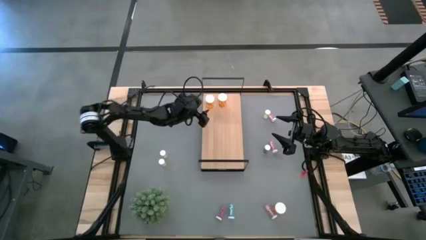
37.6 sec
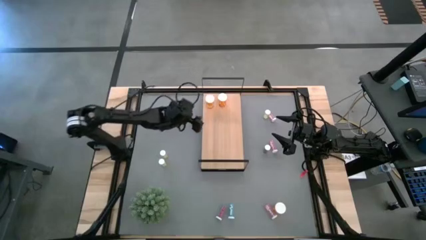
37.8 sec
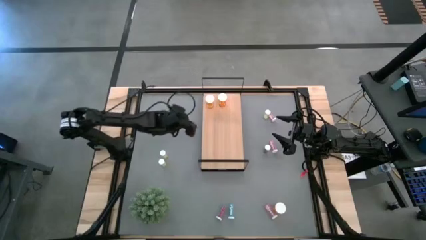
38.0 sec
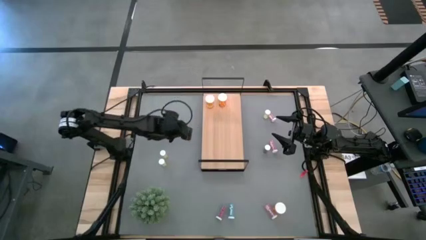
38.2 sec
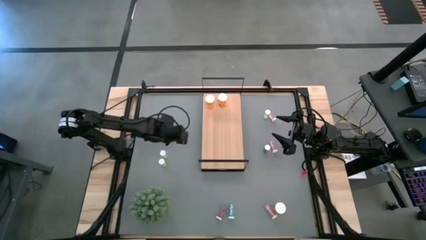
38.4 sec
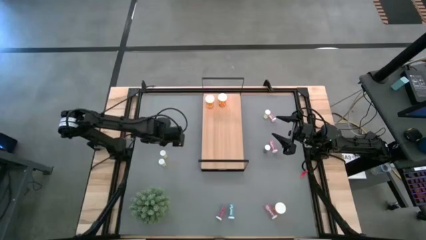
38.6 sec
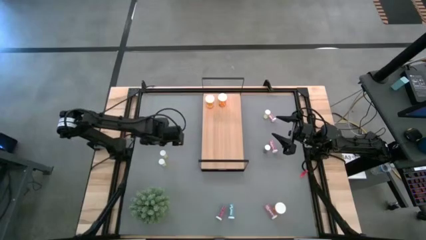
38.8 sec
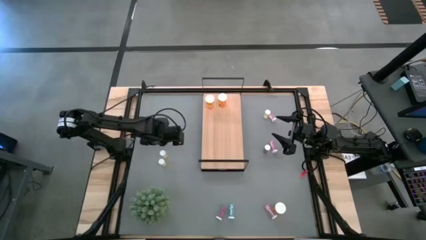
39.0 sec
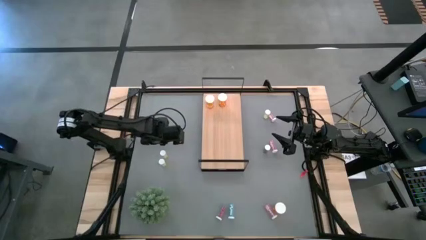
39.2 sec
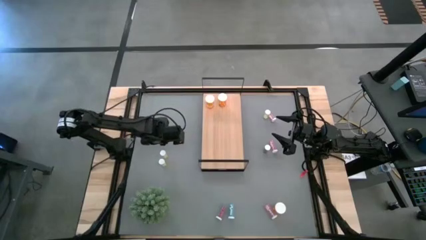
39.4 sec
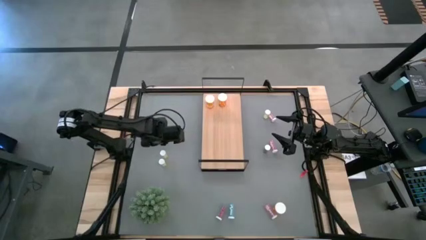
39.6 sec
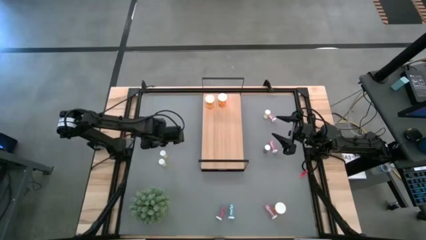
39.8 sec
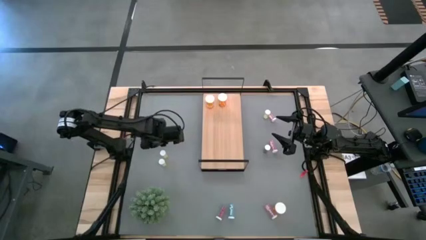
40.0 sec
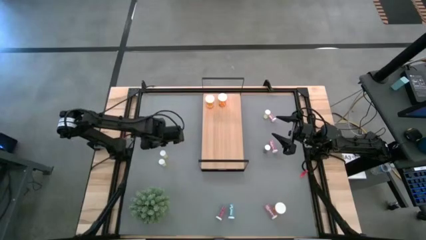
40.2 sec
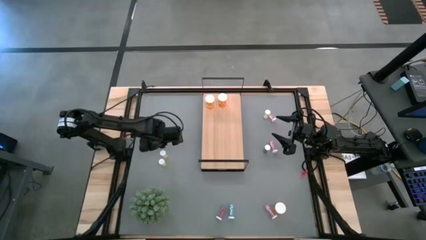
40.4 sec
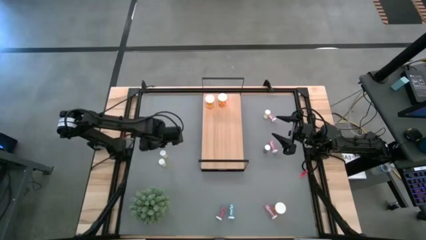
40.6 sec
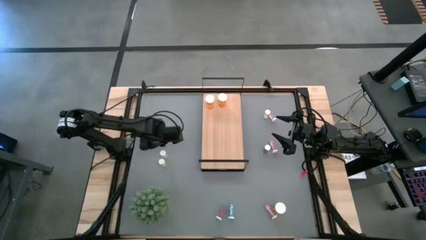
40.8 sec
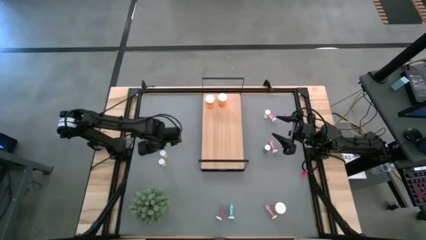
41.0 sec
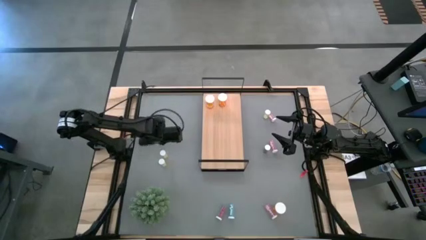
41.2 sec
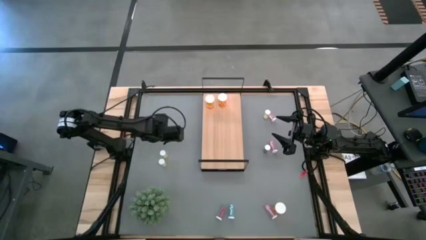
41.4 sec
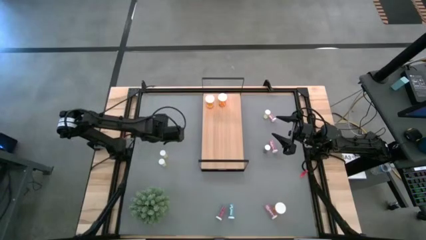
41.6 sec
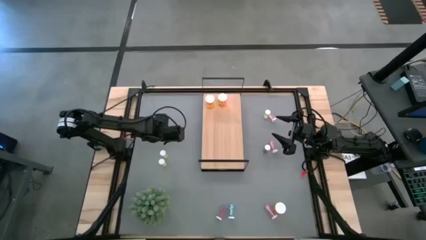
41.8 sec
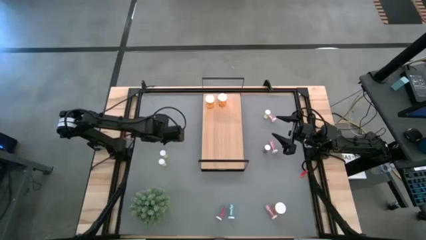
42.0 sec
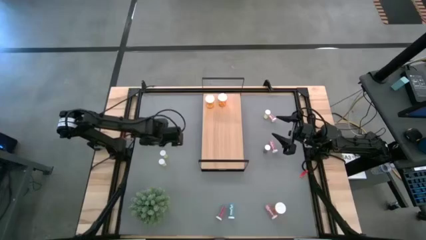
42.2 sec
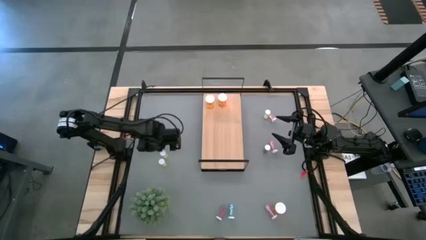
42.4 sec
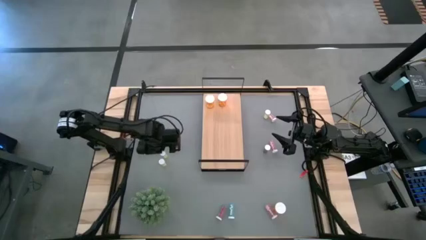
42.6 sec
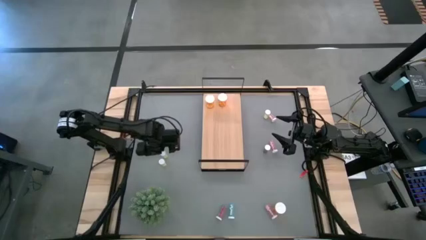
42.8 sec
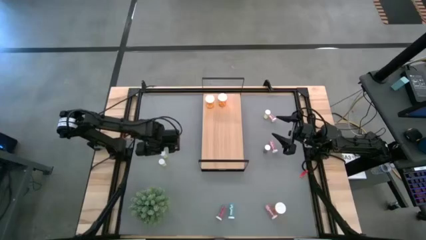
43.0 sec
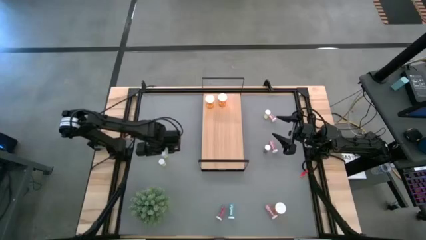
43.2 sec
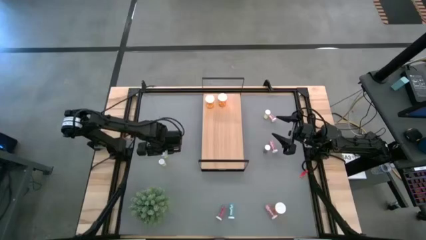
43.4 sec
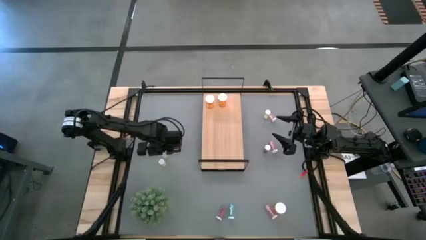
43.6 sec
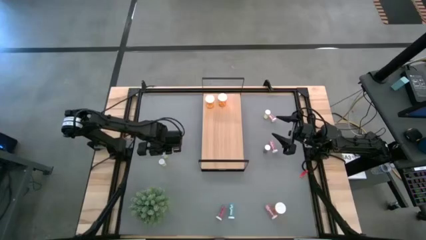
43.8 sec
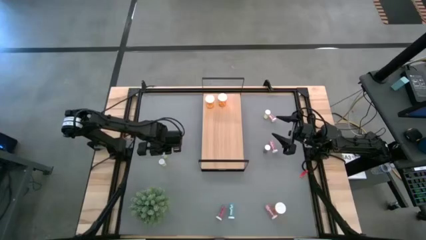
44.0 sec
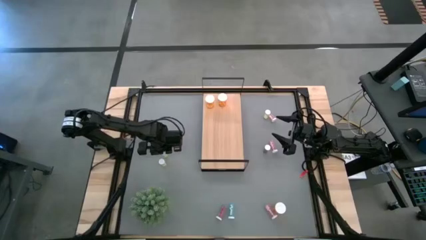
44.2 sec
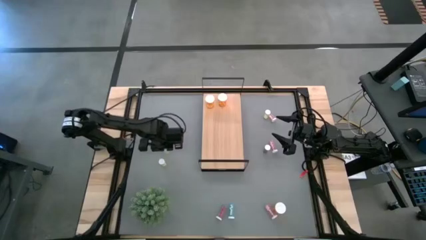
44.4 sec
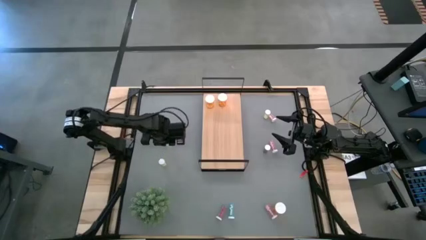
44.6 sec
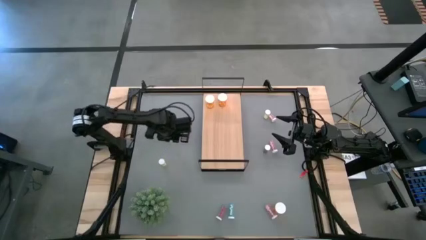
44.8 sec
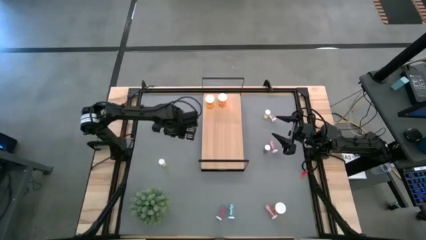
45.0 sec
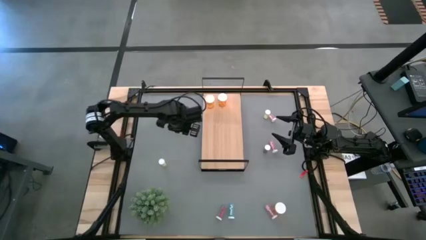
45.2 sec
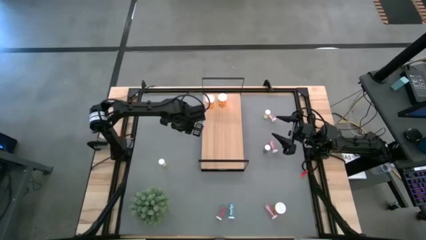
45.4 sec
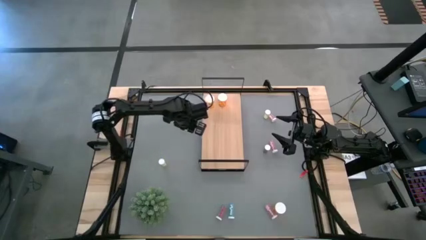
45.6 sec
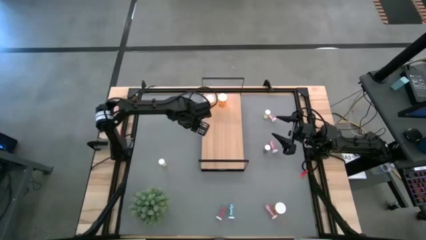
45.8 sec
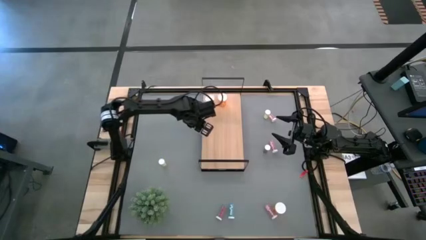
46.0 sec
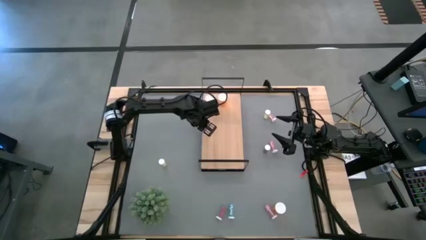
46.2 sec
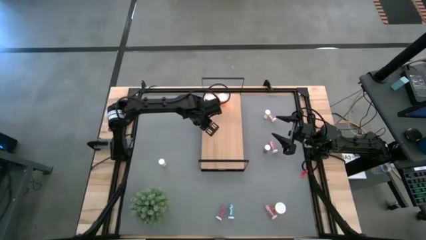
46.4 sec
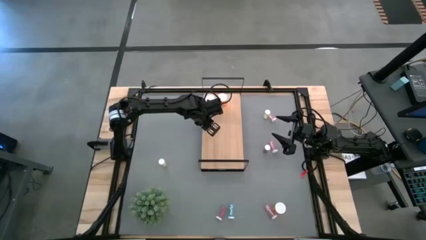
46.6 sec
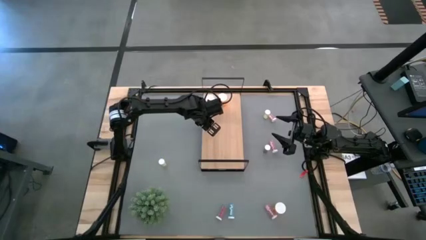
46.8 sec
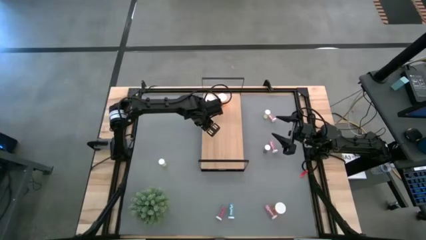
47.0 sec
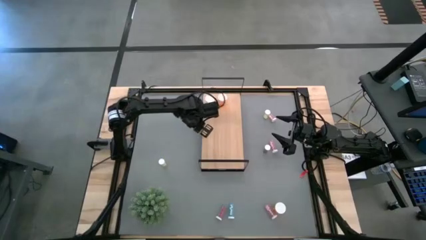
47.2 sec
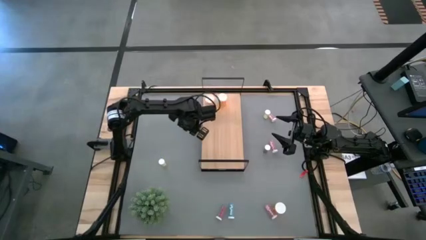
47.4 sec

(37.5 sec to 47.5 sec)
Task: Pick and place medicine bottles onto shelf by color
Put the middle yellow pill bottle on the shelf

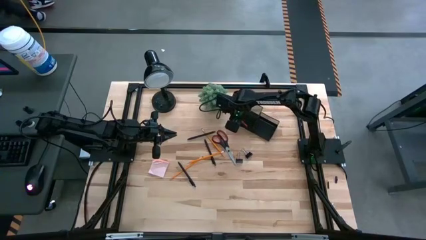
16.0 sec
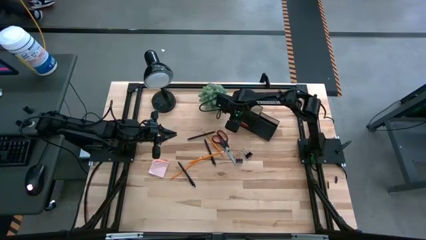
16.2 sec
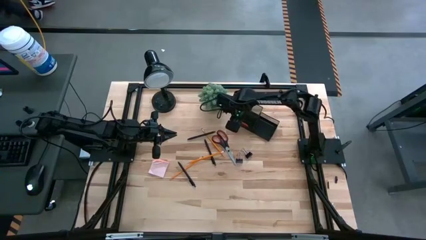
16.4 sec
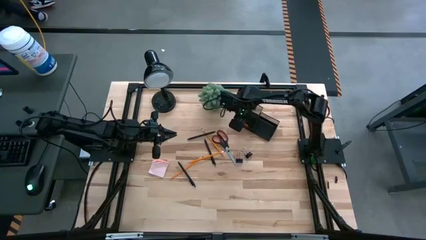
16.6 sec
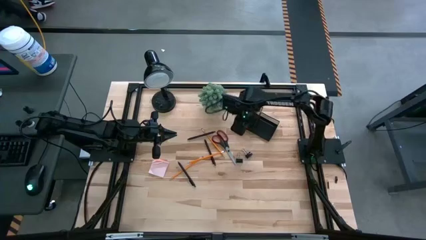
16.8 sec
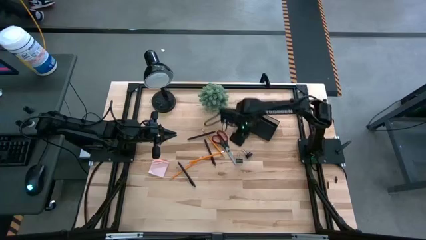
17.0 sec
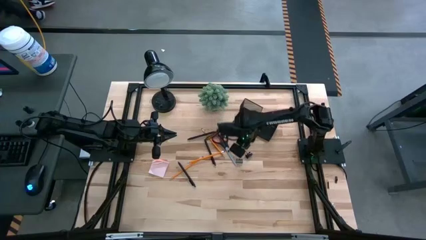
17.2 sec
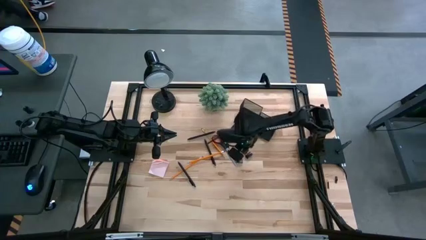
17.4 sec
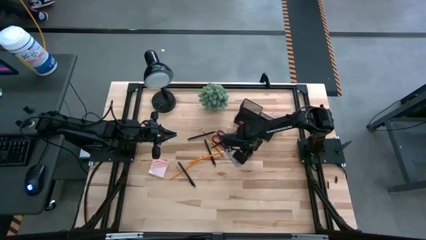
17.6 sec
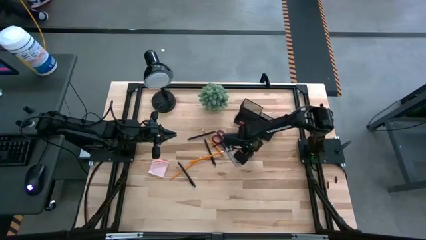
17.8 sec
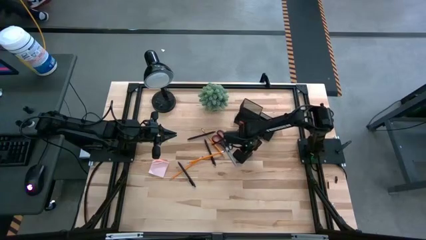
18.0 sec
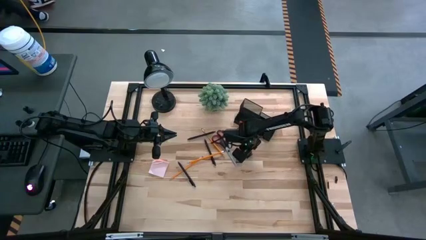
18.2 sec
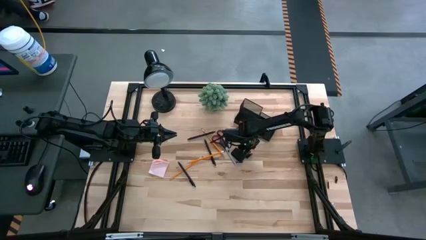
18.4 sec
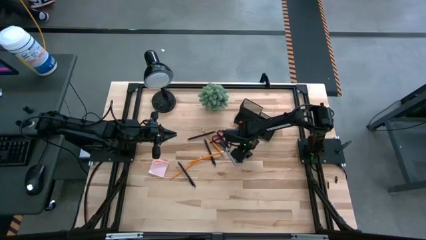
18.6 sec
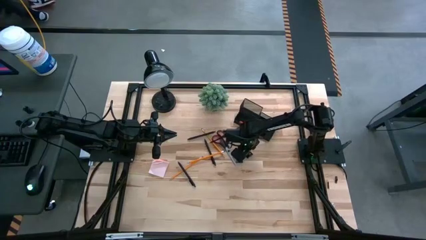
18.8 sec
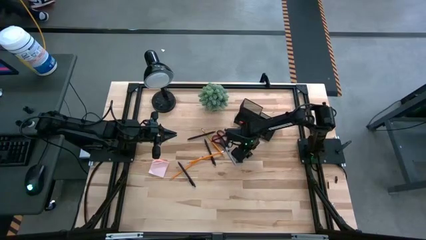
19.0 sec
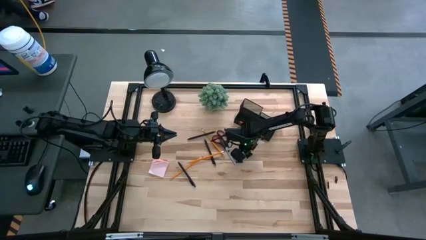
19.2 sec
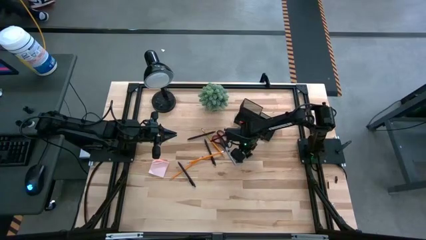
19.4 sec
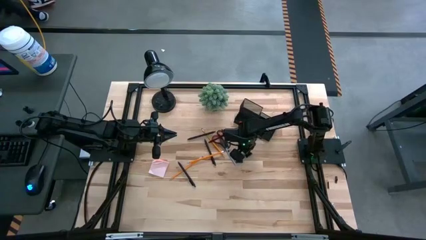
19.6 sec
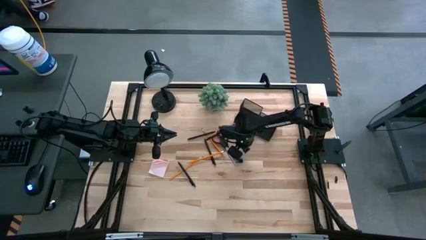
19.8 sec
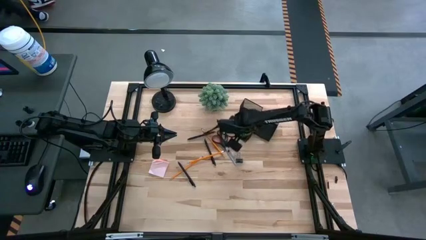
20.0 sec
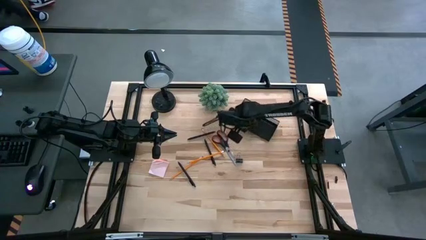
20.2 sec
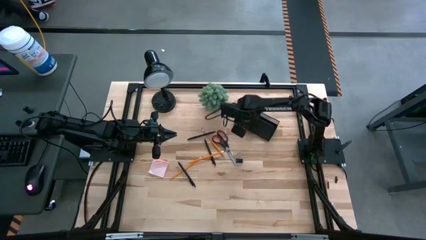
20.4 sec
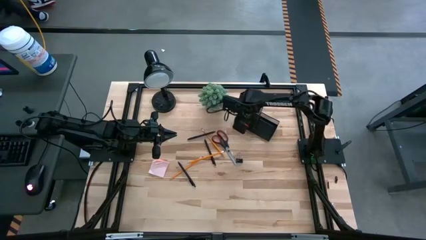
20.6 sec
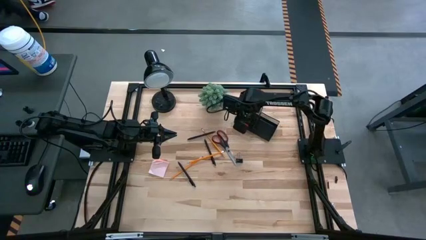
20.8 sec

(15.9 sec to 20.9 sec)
Task: Pick and place office supplies into organizer
Put the right black binder clip into the black desk organizer
